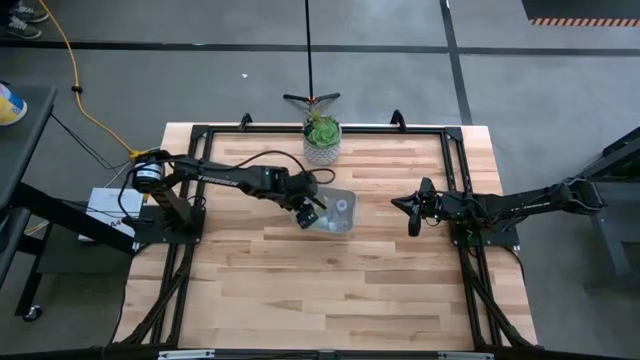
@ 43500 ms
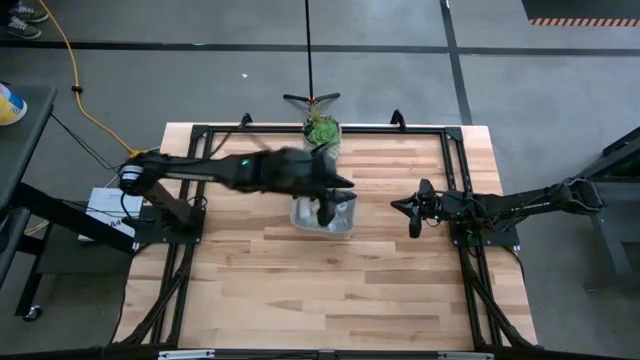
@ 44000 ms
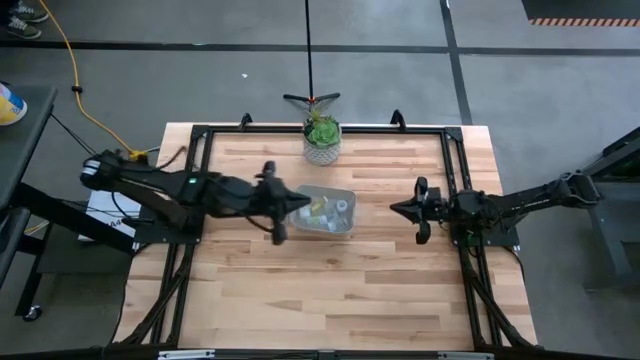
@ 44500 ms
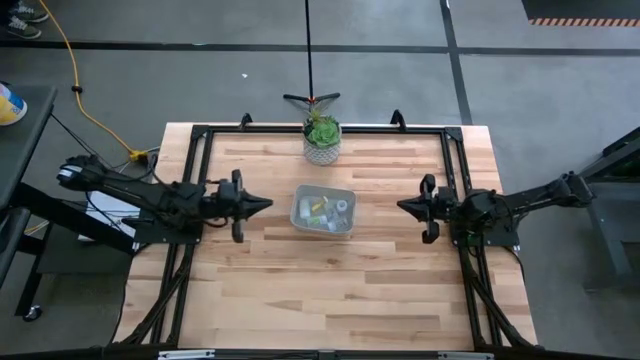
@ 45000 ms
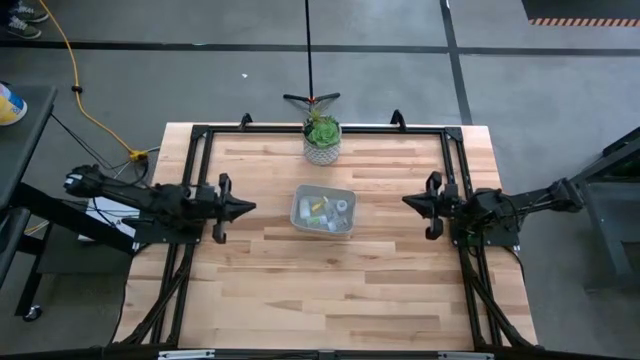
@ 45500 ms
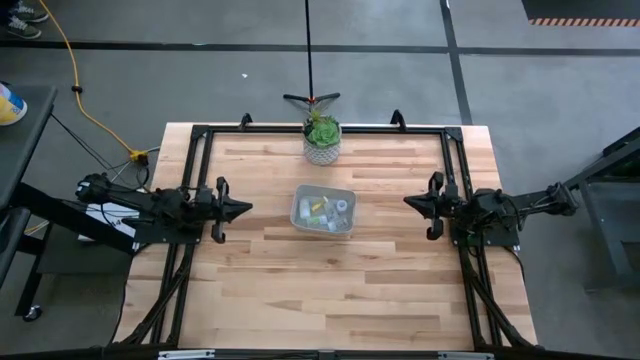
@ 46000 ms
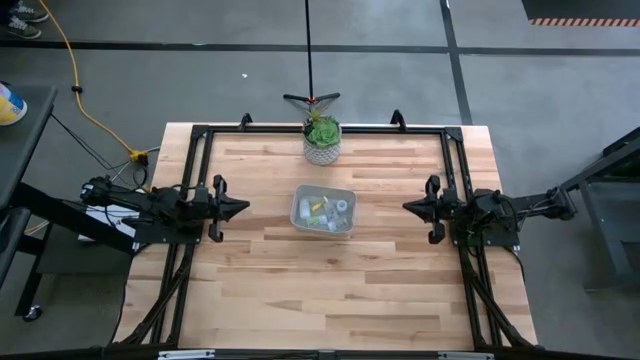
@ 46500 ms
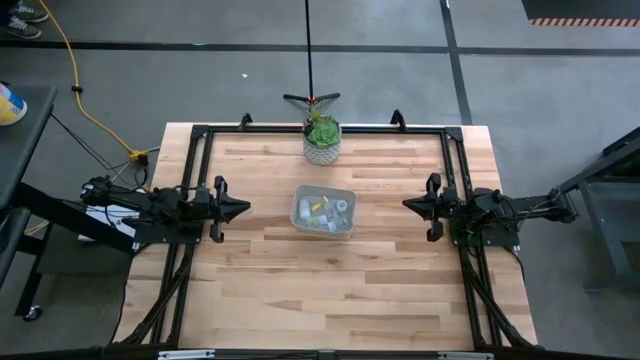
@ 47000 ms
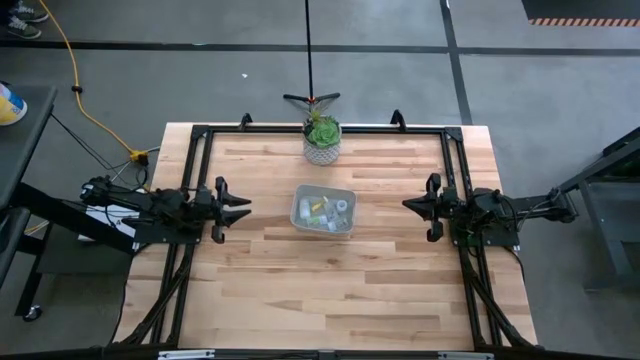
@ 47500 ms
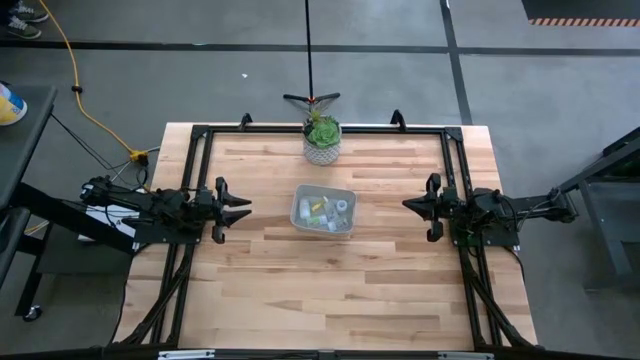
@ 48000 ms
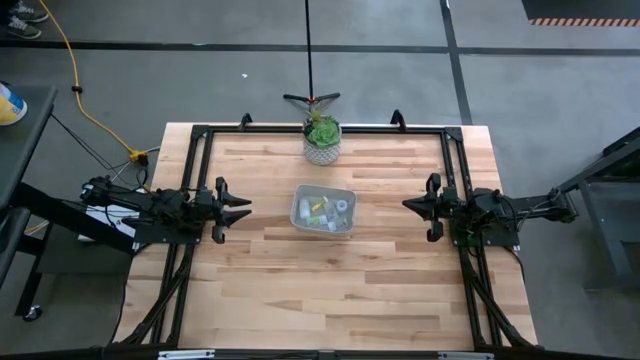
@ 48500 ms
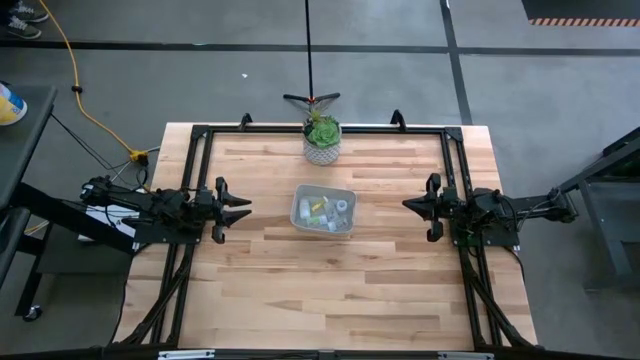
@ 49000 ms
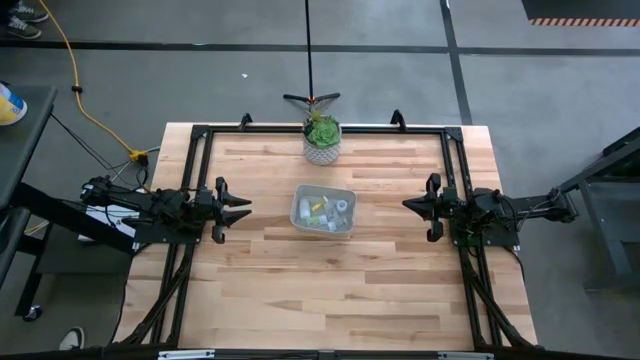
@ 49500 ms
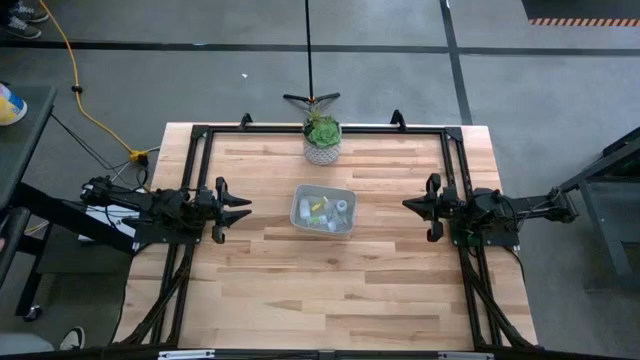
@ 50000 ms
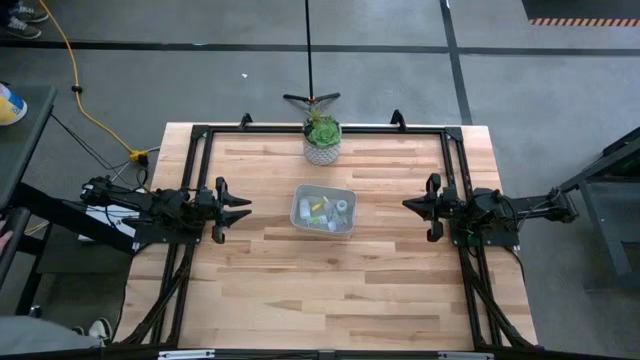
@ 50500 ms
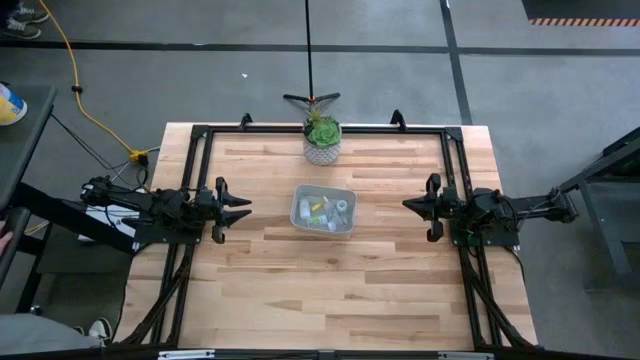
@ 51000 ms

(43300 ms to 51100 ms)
Task: Pick and place pill bottles into a basket
Return to Home Position

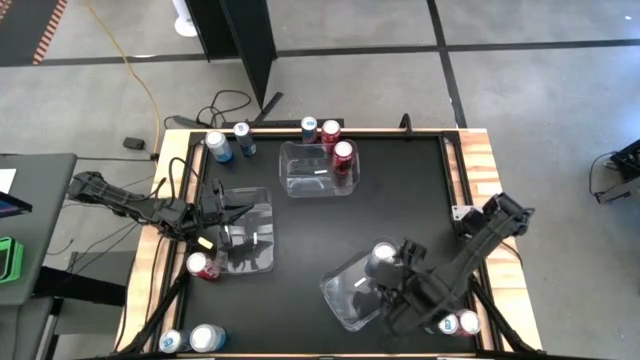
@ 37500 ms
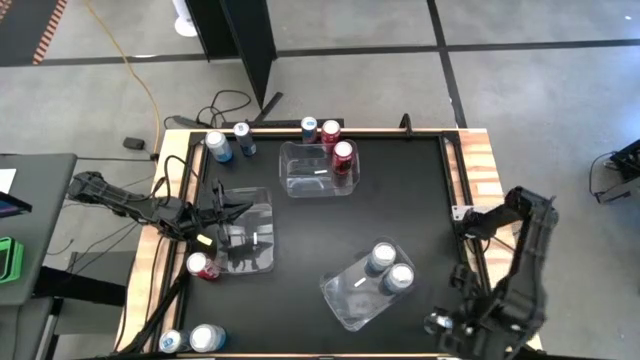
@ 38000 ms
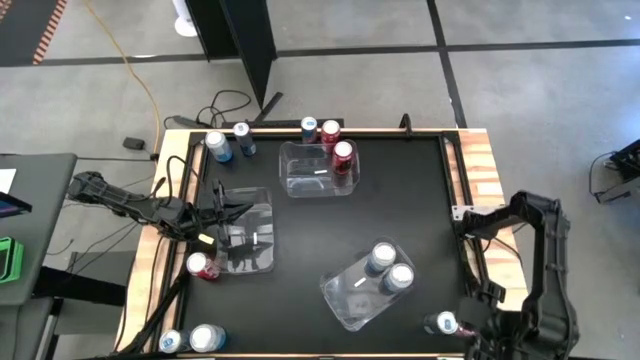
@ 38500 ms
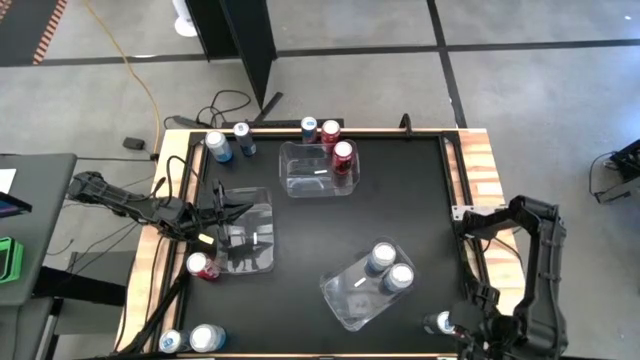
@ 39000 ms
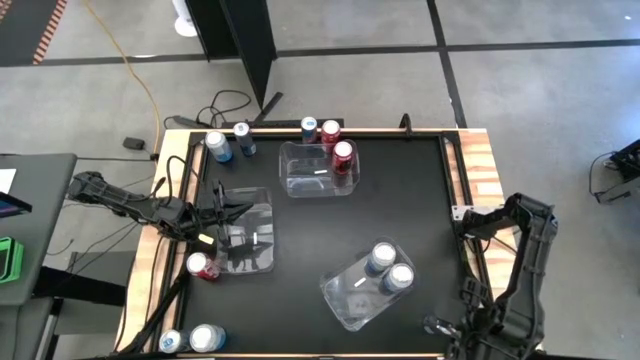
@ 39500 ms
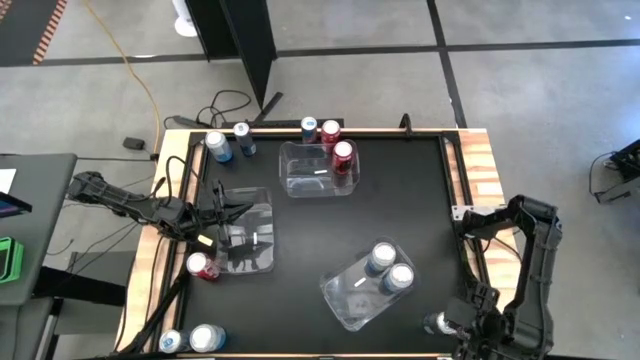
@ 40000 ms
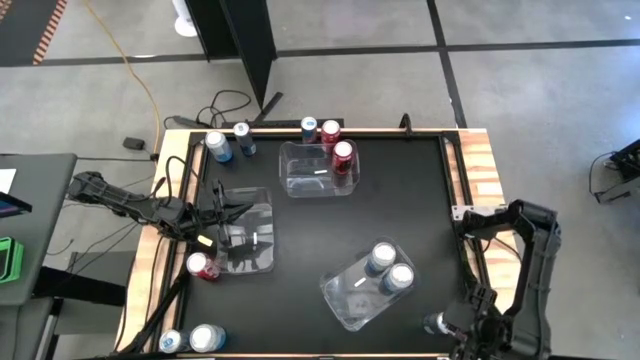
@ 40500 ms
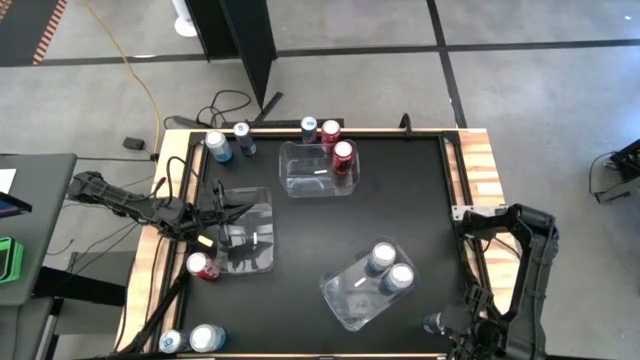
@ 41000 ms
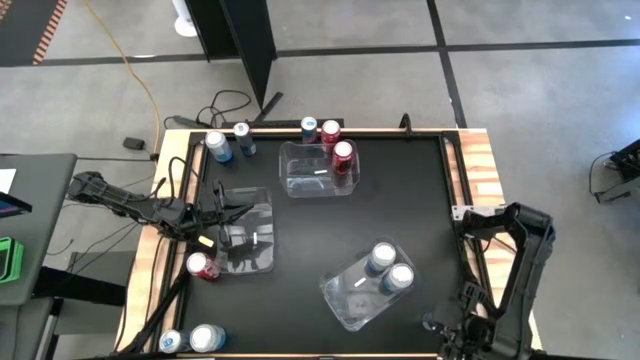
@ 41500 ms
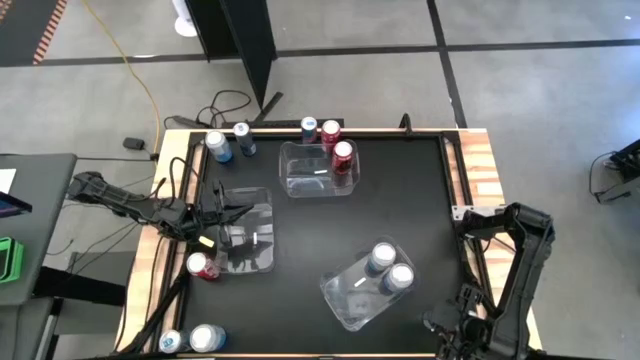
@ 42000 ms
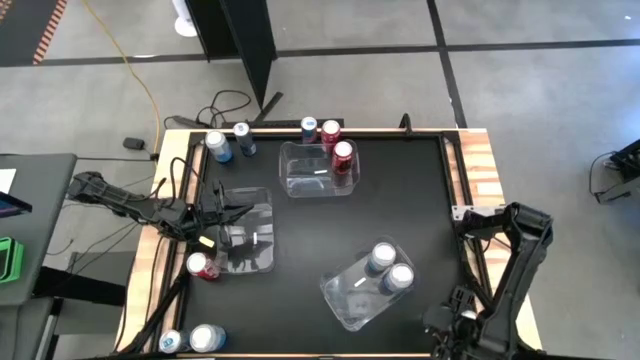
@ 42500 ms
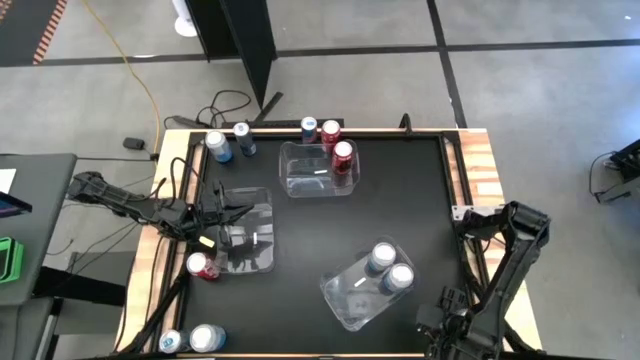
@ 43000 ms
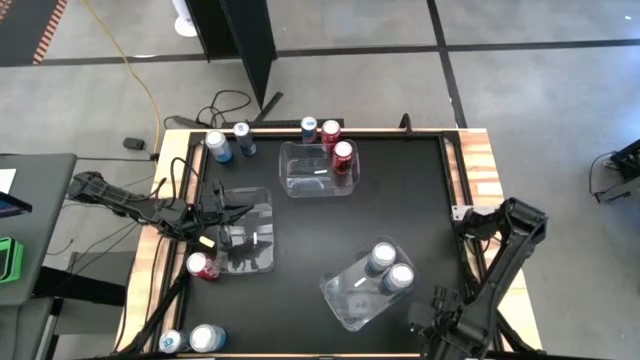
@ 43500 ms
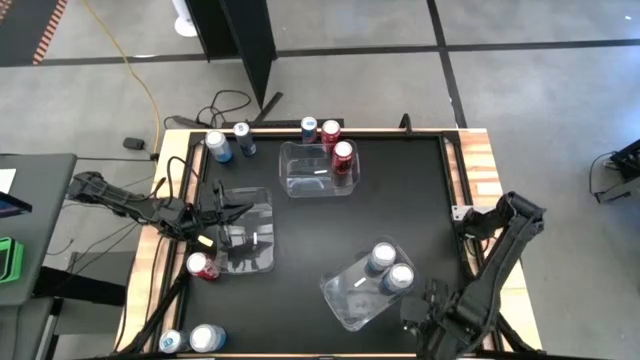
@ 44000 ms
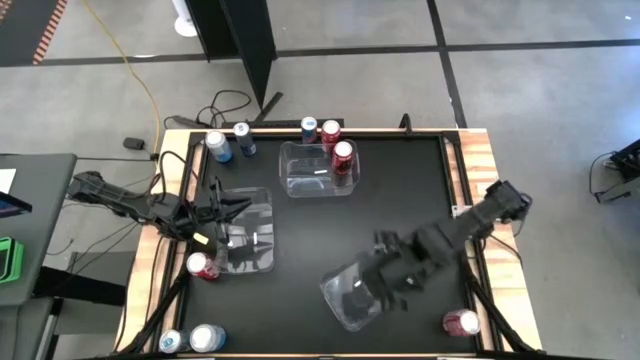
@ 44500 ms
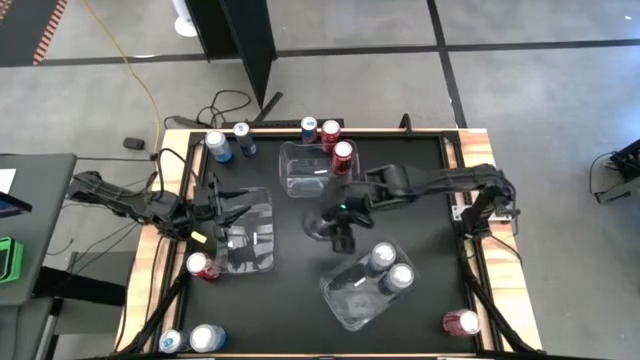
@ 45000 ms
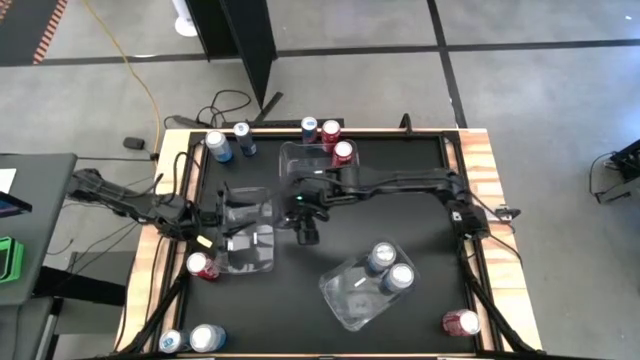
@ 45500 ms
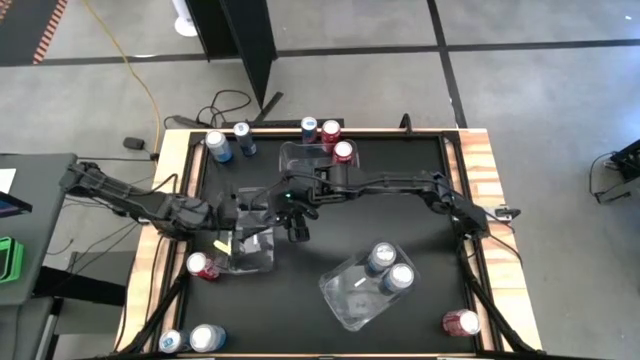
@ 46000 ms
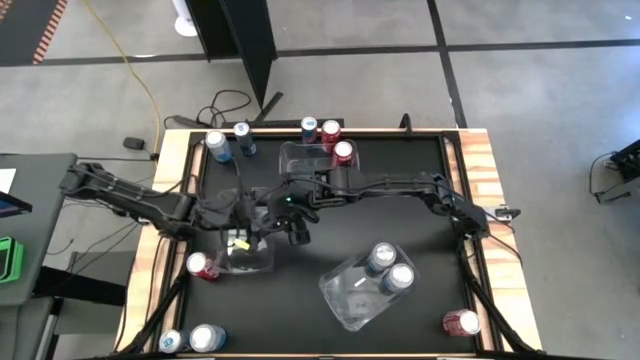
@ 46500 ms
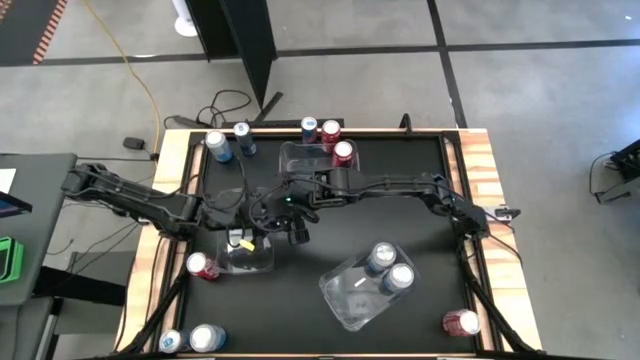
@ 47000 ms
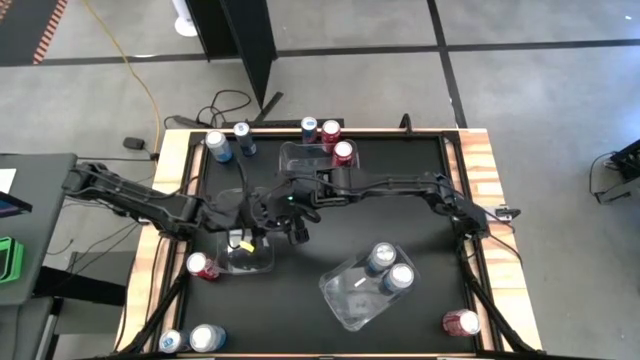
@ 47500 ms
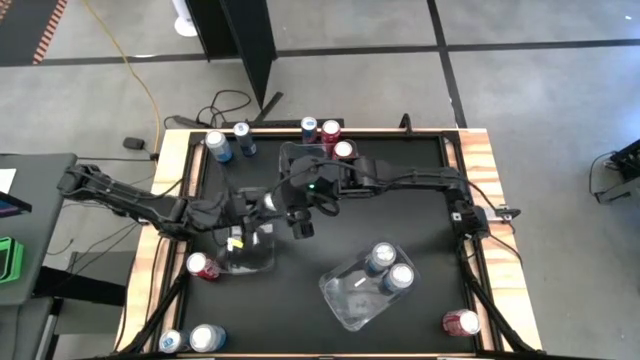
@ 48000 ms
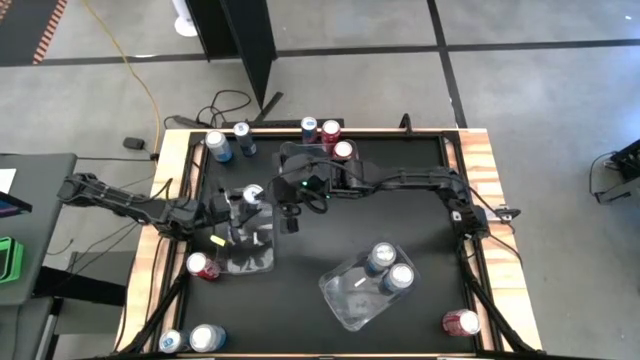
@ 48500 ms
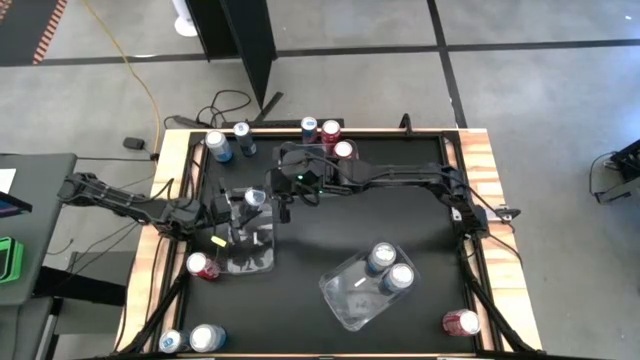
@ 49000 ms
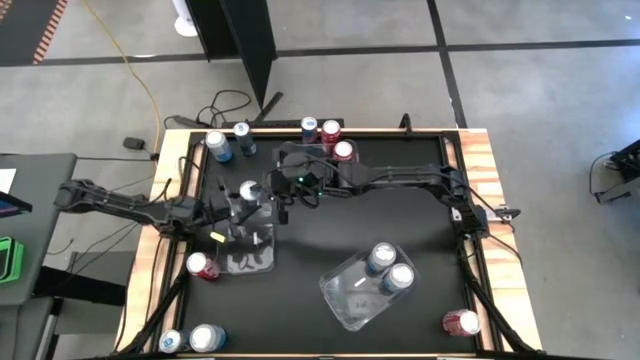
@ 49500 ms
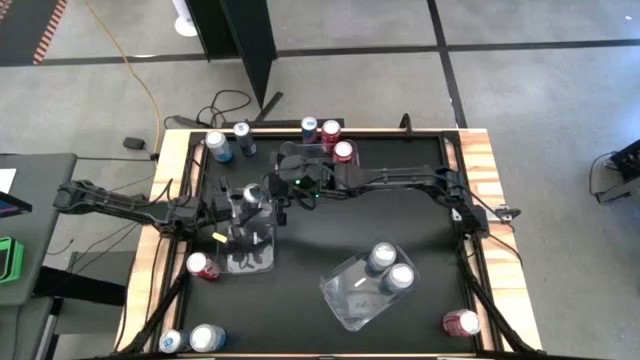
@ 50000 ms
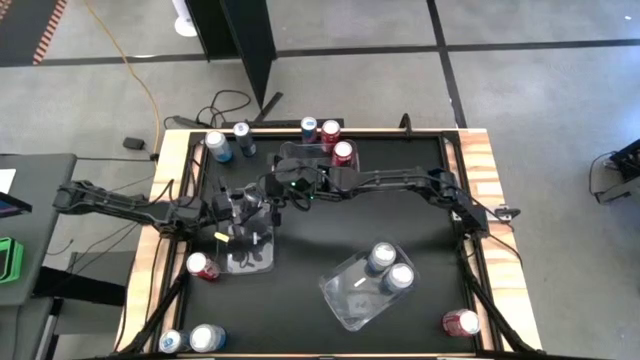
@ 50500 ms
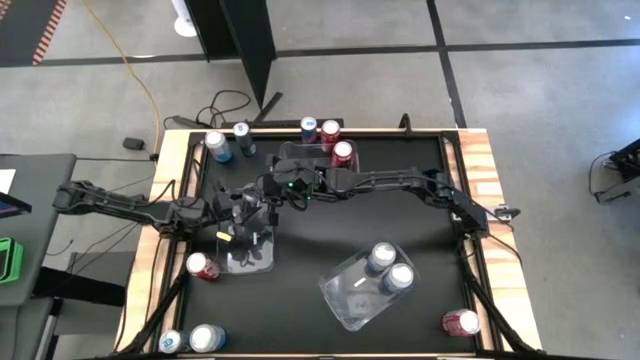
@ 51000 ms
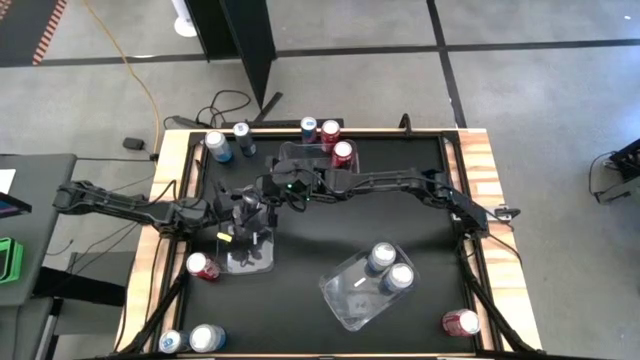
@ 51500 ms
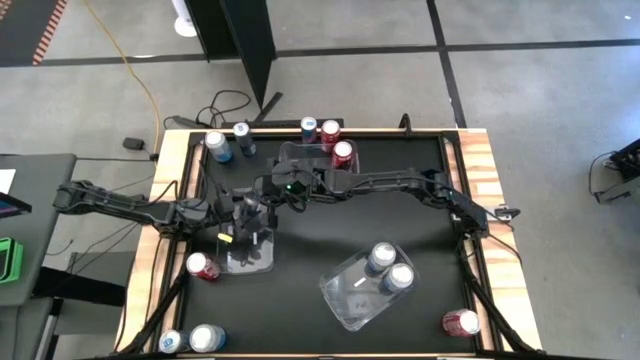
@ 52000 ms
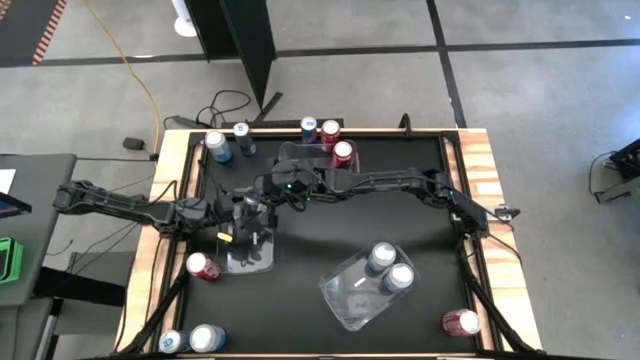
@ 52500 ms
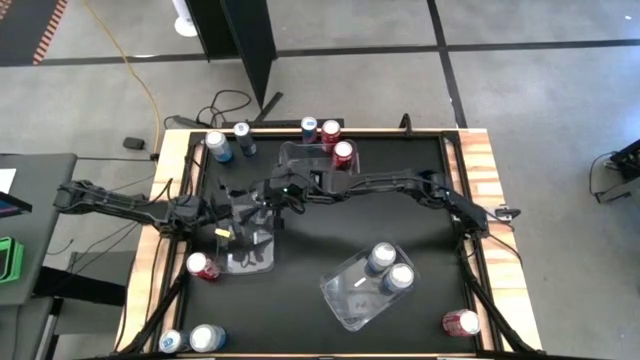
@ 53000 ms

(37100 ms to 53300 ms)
Task: Sort soda cans
Put the blue soda can into the middle left transparent bin
